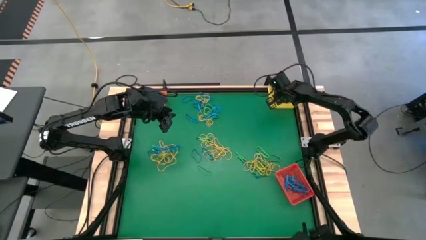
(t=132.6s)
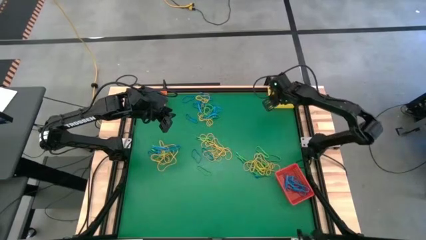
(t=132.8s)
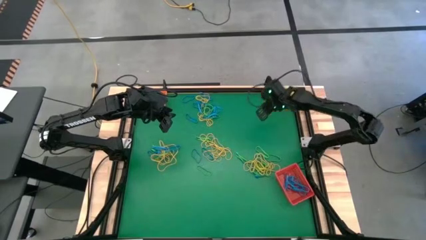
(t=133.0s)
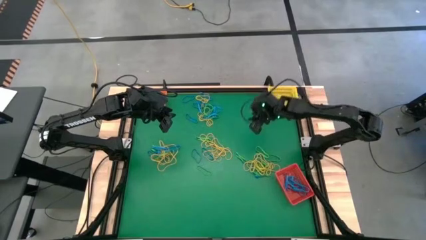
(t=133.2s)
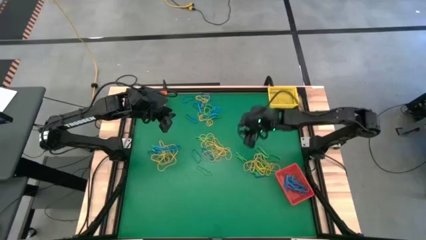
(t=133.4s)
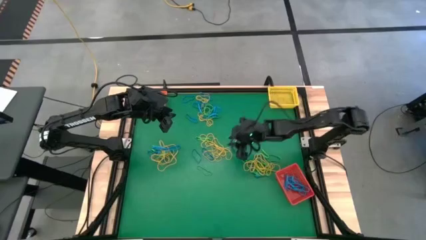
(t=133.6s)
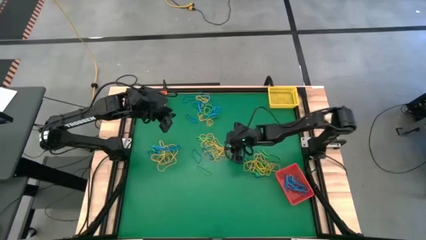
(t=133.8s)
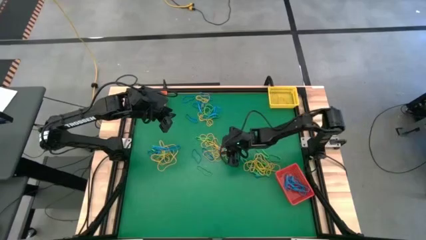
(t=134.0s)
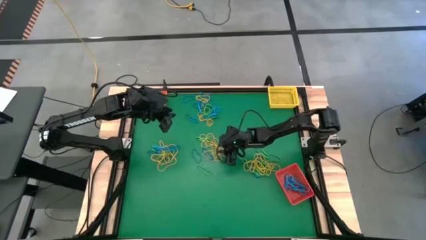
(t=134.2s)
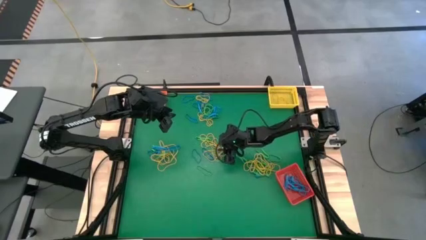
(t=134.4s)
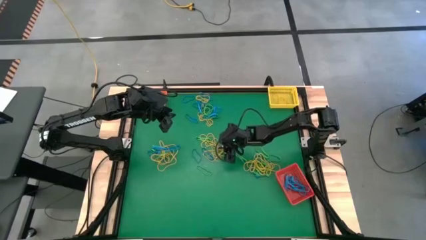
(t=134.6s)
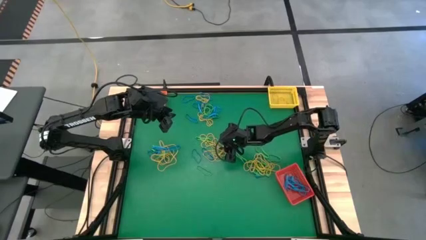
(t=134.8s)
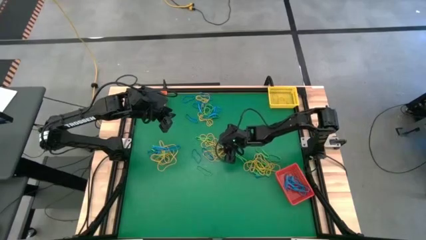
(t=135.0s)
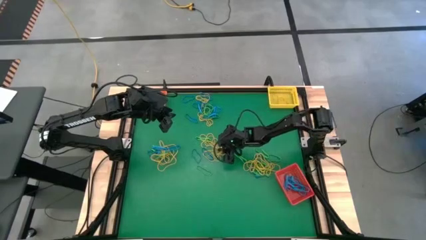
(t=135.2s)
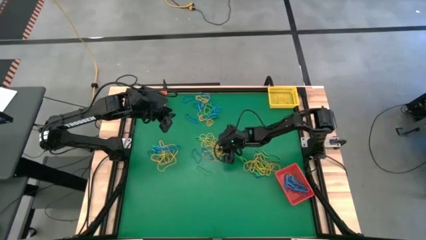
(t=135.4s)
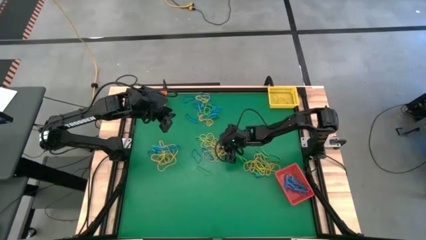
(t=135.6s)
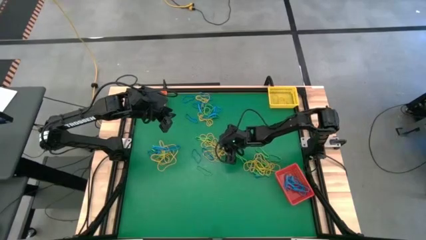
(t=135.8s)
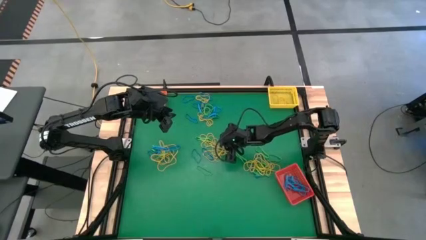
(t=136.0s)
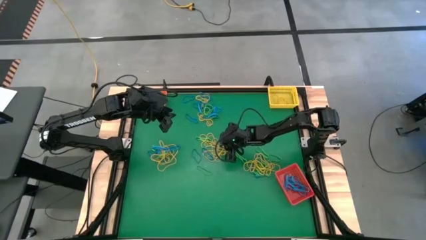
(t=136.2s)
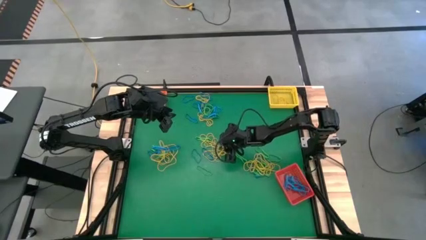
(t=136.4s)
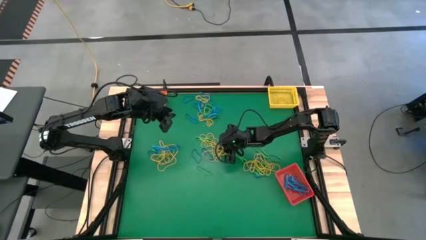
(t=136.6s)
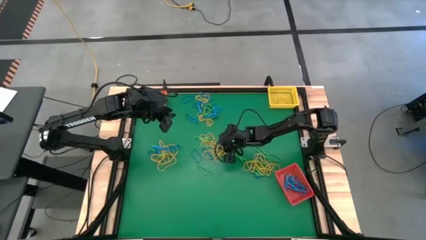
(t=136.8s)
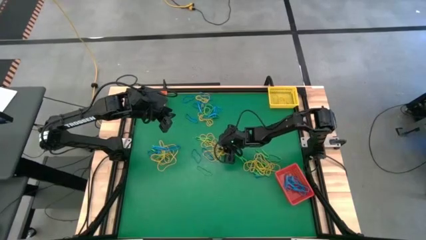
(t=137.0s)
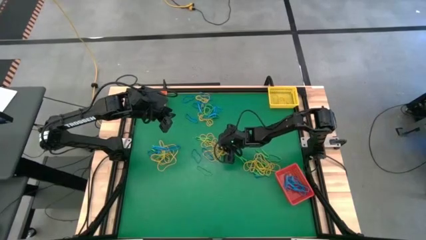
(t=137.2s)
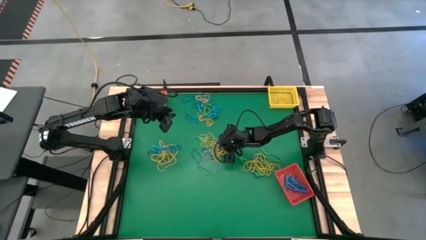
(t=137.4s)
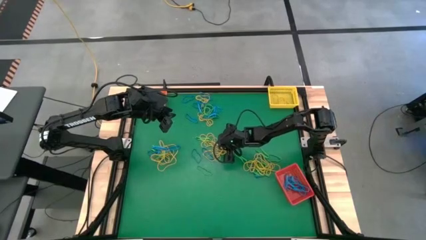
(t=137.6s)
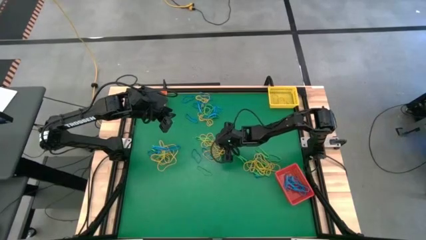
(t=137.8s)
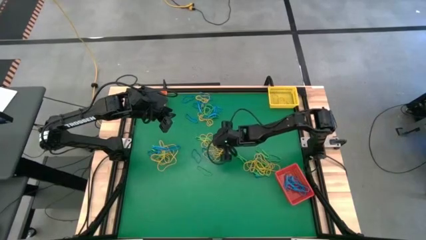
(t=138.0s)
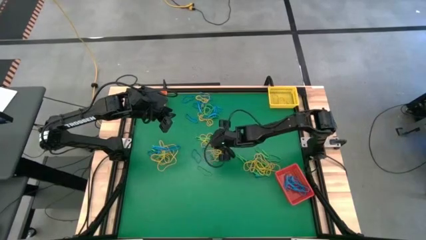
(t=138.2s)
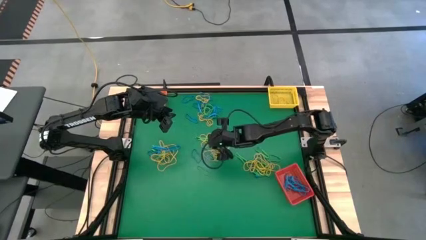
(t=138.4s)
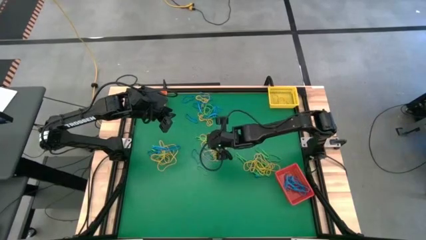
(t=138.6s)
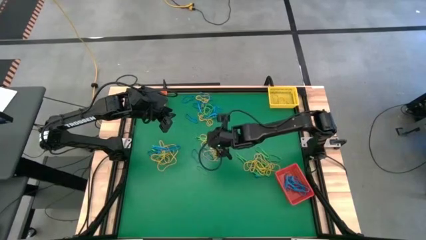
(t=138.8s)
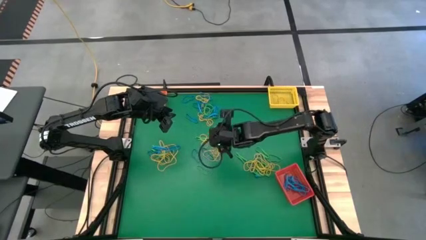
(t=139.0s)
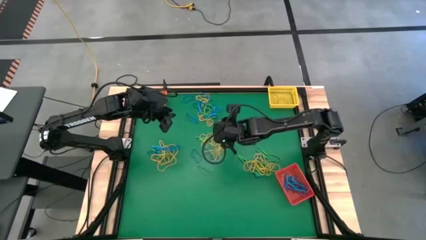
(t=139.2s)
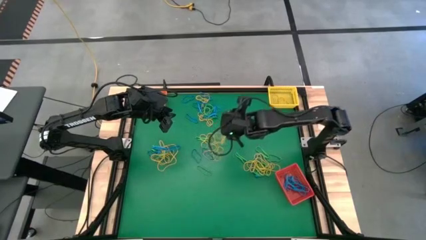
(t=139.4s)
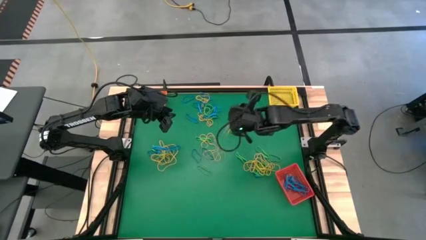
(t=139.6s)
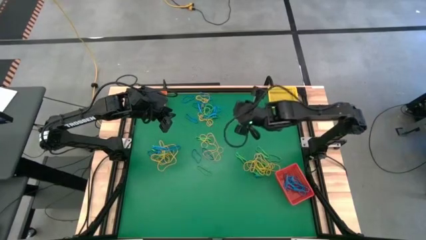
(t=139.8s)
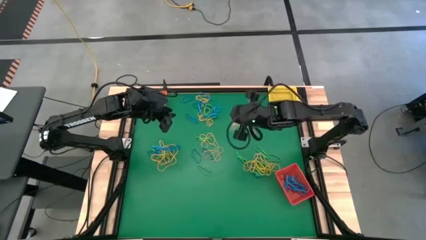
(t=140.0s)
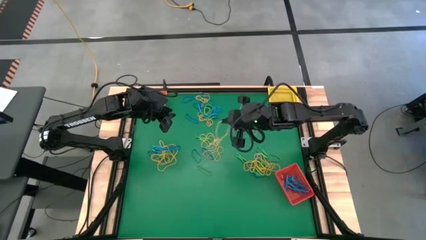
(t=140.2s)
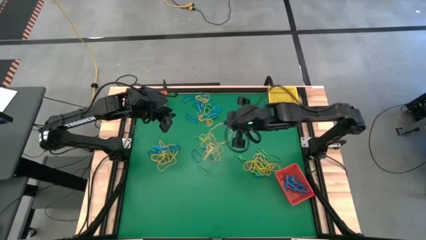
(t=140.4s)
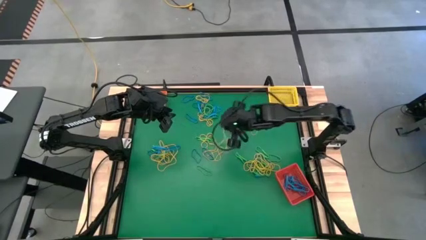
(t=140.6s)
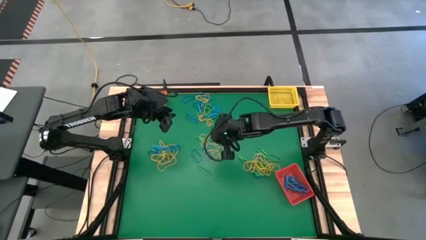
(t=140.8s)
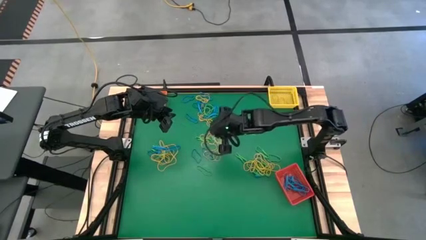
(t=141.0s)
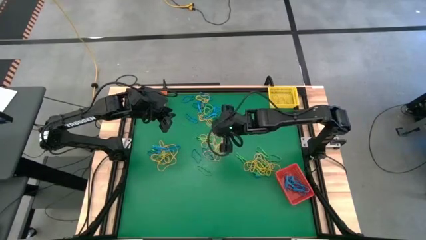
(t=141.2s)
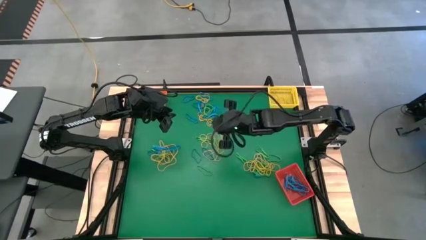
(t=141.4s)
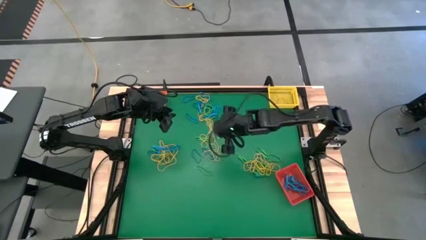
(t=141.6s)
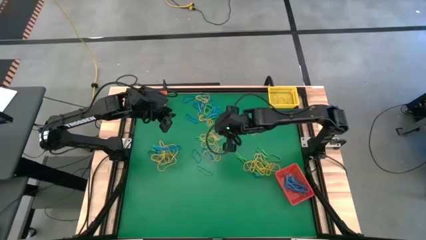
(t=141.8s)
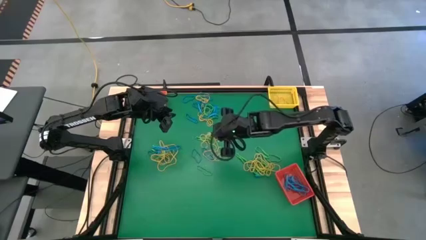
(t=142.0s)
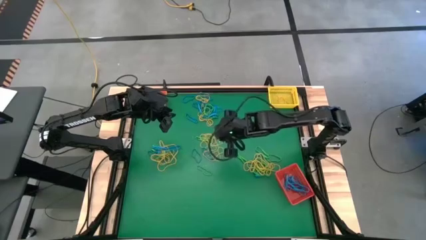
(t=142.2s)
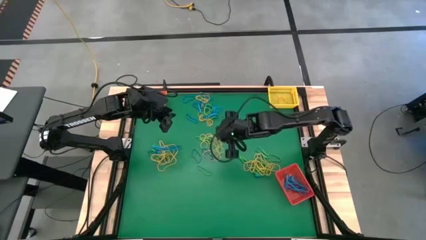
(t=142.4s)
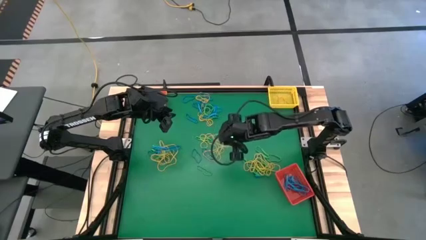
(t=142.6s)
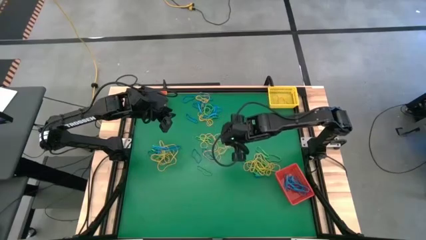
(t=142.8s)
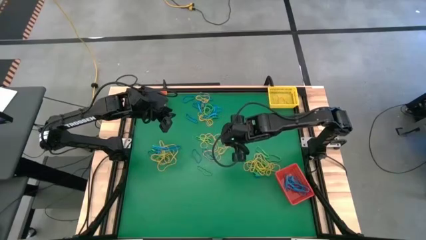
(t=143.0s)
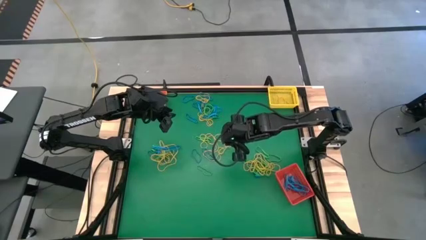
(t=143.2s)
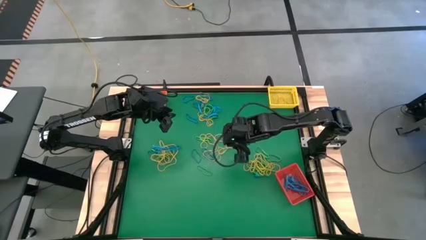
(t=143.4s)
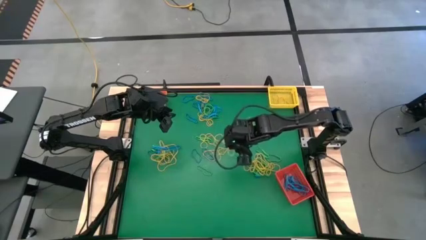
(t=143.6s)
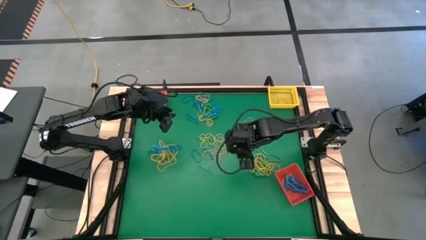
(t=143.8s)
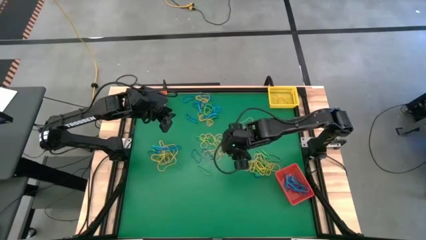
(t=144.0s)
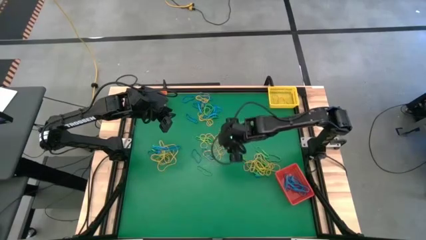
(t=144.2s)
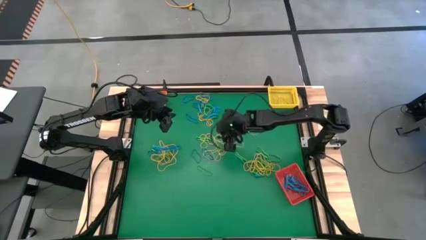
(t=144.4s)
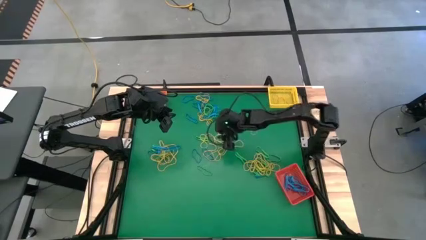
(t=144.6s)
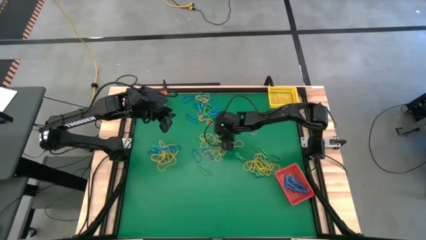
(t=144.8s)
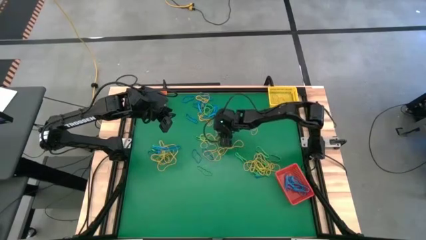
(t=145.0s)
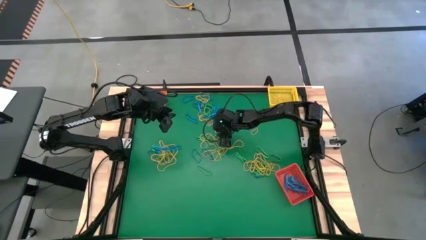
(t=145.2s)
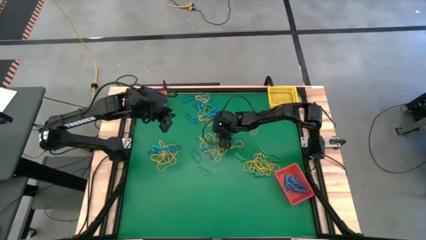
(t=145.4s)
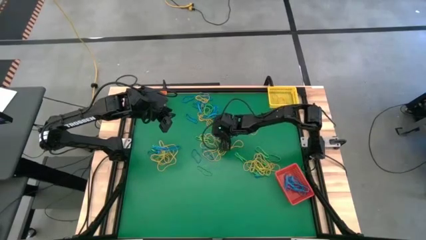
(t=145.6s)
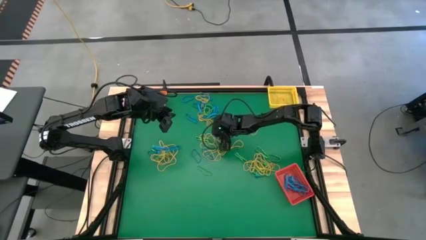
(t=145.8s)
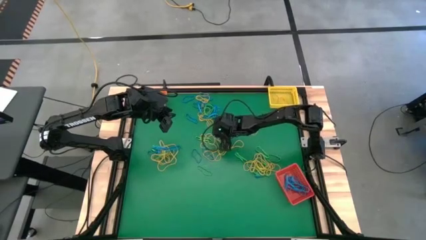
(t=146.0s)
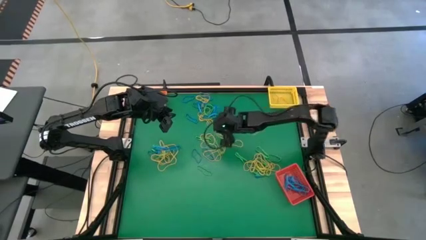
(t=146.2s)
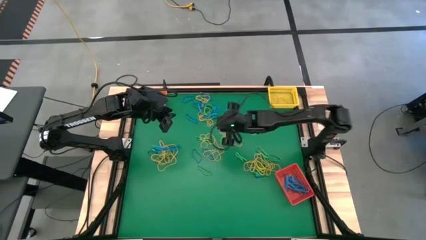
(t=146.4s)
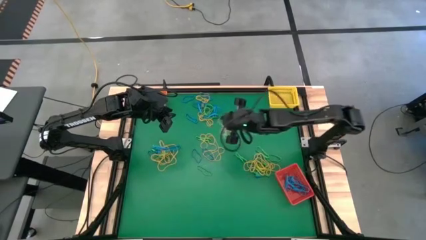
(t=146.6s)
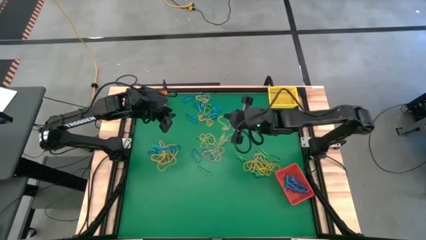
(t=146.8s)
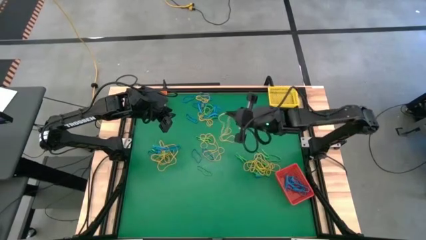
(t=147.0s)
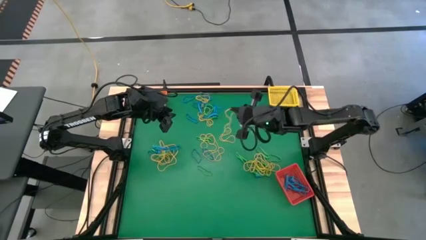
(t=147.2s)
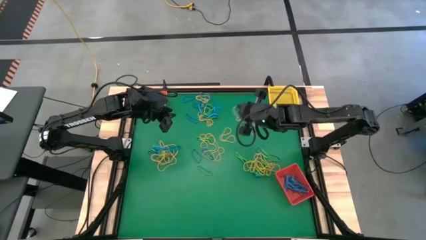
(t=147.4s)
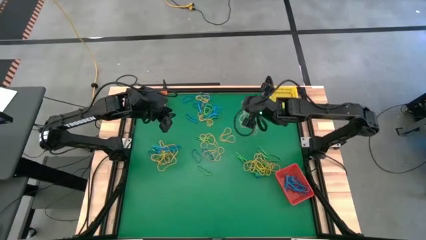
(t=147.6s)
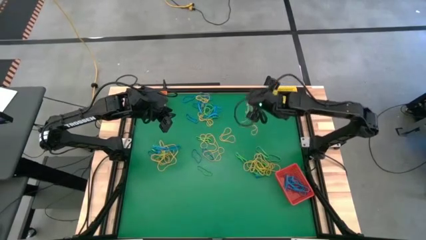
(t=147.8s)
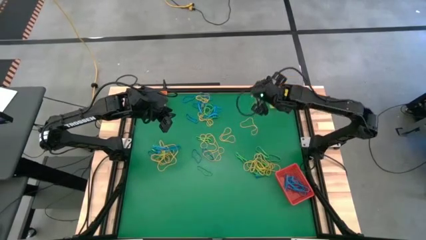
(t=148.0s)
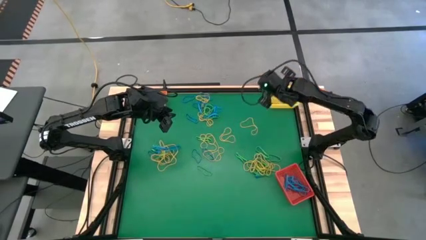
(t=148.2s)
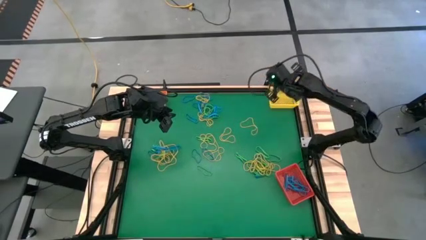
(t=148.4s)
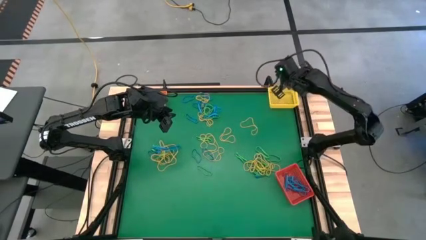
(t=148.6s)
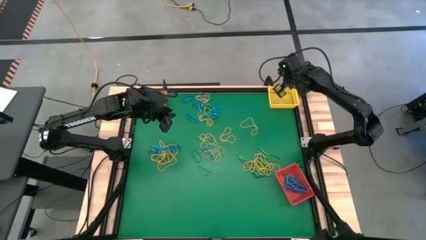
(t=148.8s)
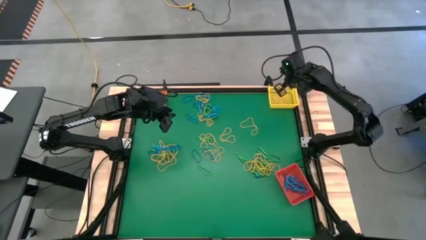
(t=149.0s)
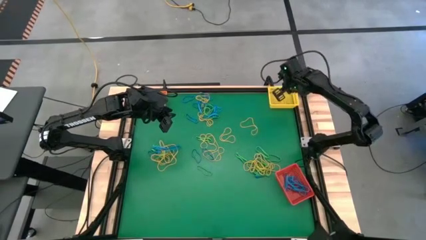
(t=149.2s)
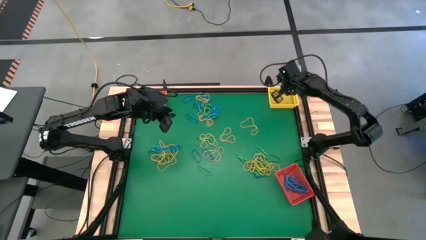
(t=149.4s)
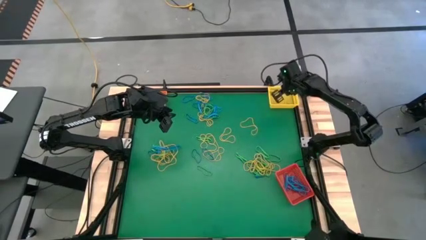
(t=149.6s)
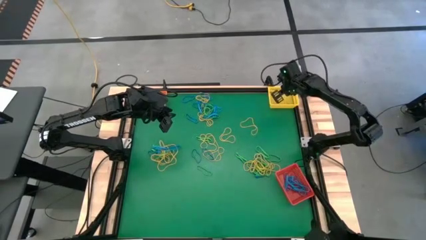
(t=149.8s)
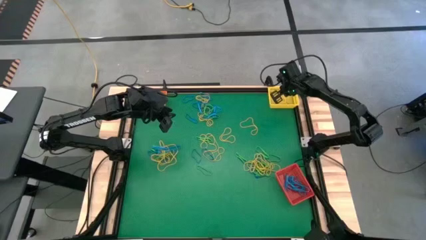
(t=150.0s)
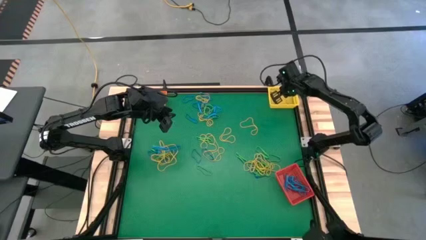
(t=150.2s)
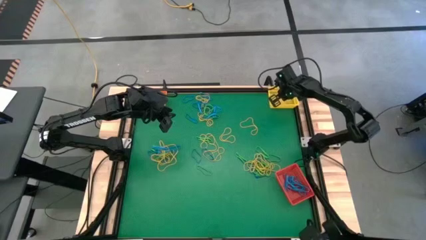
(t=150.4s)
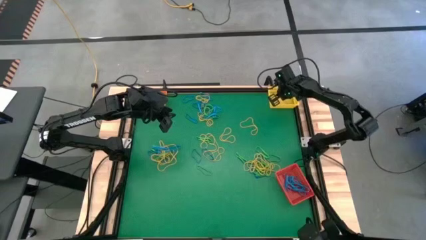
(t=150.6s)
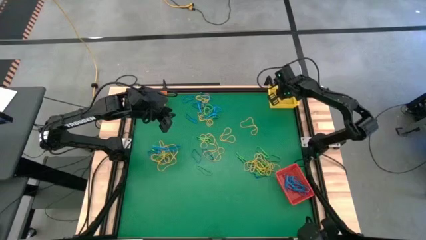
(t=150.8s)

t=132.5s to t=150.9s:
Task: Sort rubber bands into baskets
Put the yellow rubber band into the yellow bin
